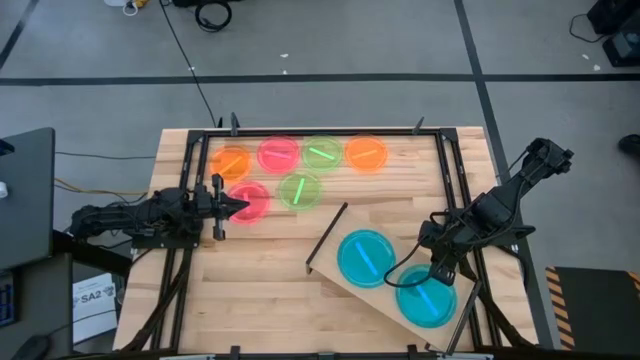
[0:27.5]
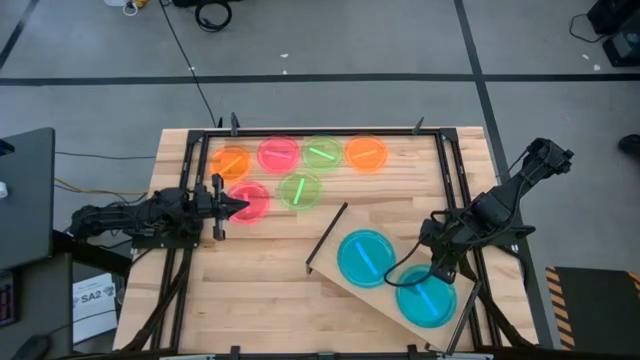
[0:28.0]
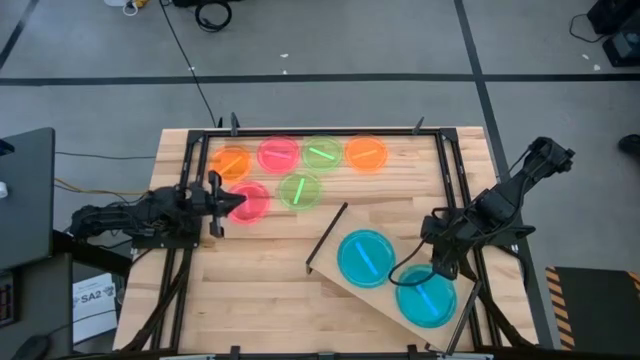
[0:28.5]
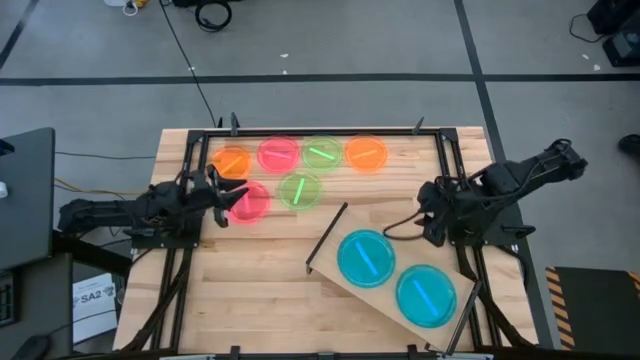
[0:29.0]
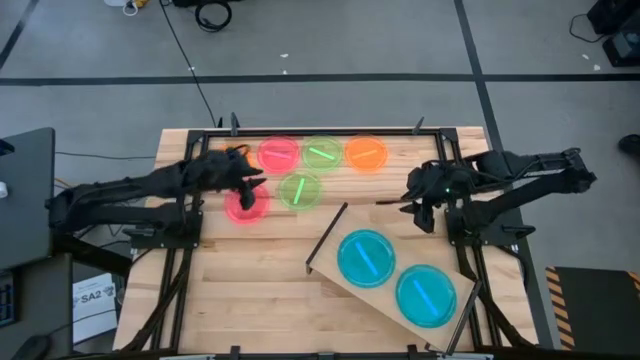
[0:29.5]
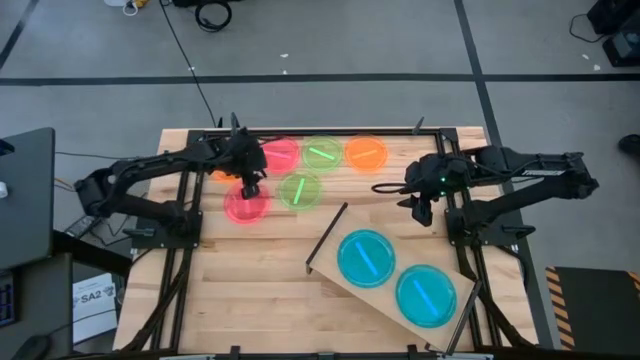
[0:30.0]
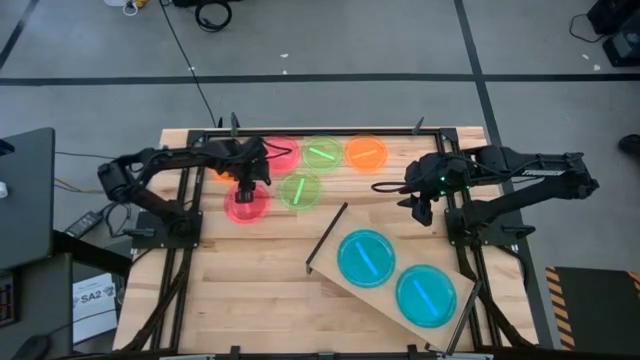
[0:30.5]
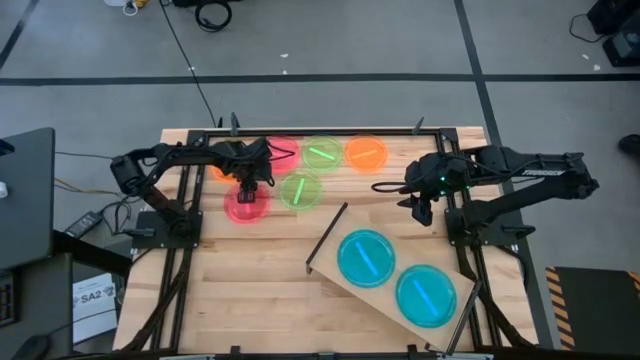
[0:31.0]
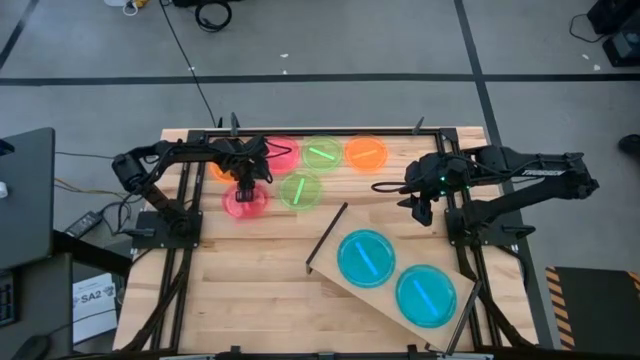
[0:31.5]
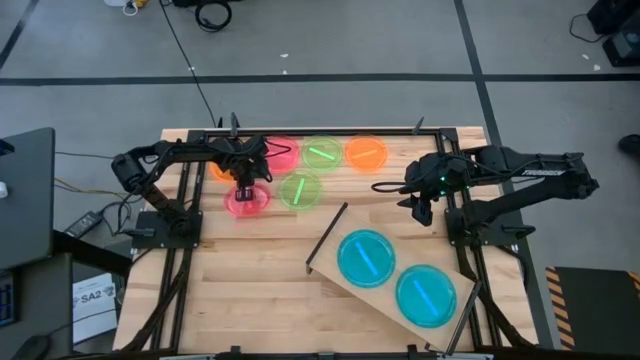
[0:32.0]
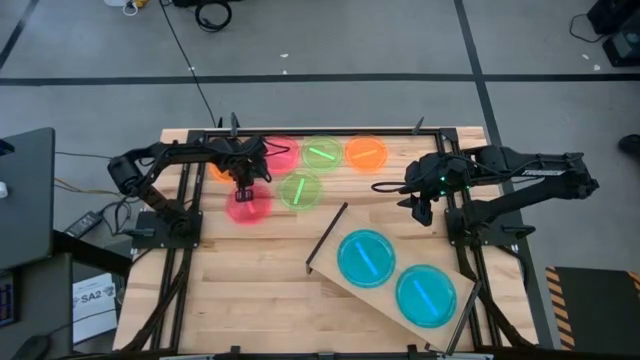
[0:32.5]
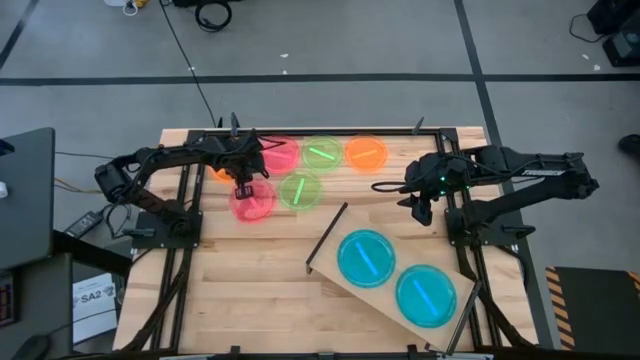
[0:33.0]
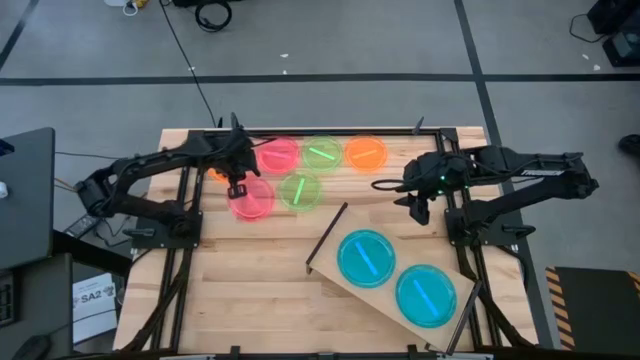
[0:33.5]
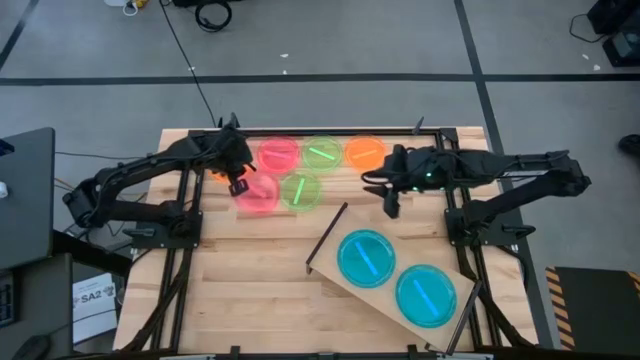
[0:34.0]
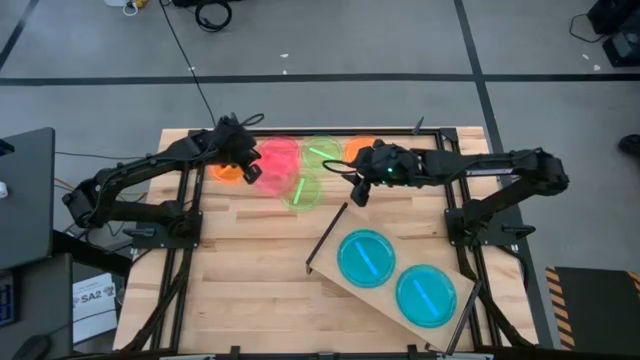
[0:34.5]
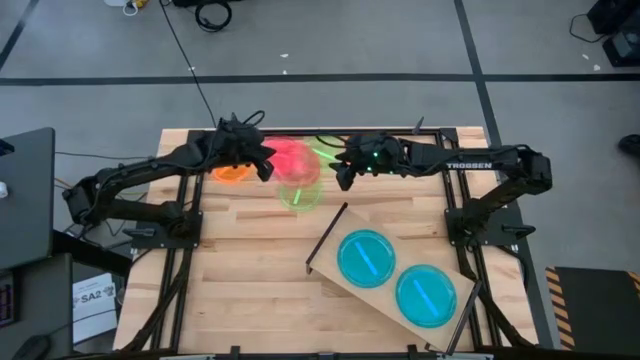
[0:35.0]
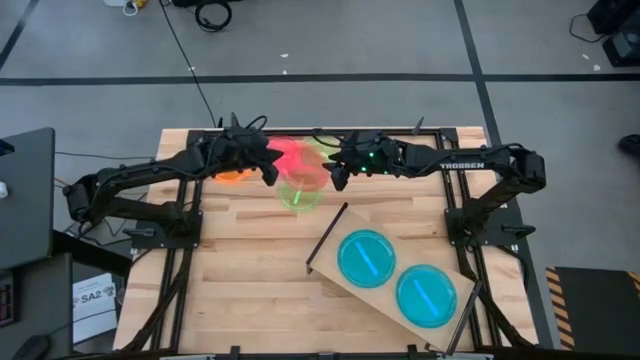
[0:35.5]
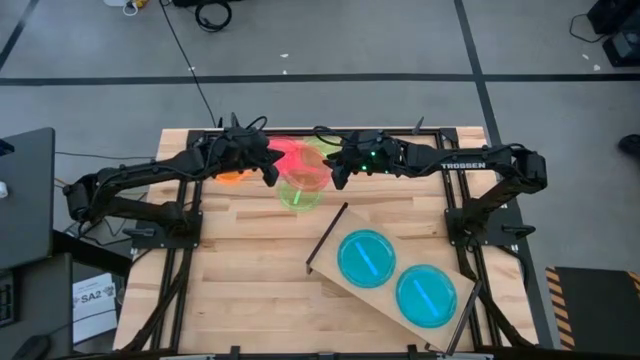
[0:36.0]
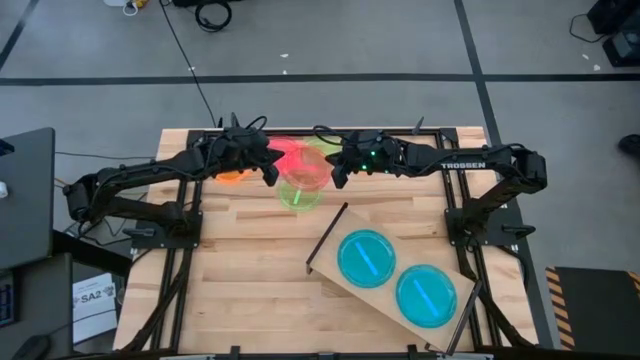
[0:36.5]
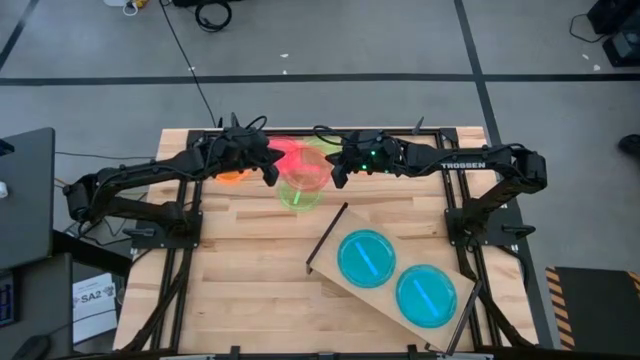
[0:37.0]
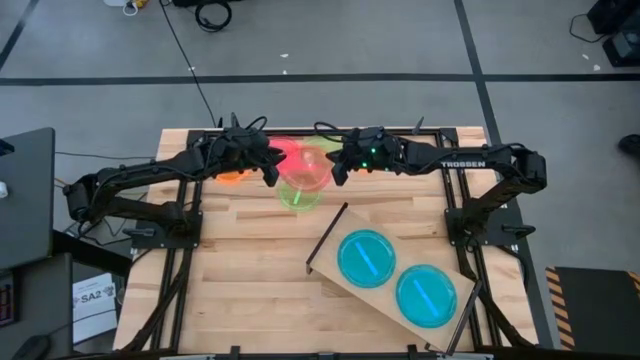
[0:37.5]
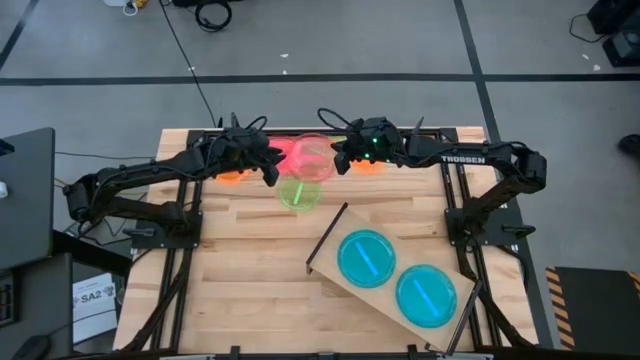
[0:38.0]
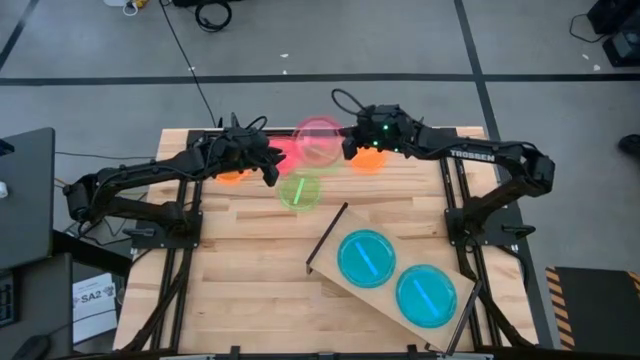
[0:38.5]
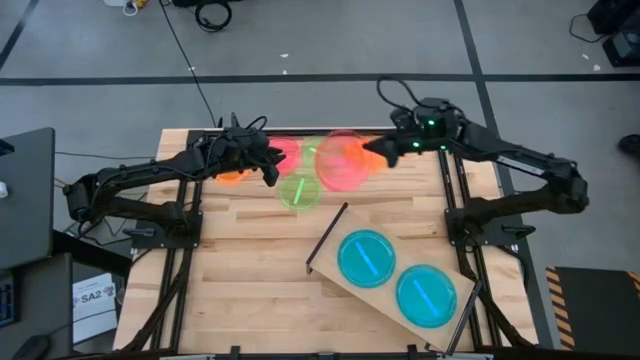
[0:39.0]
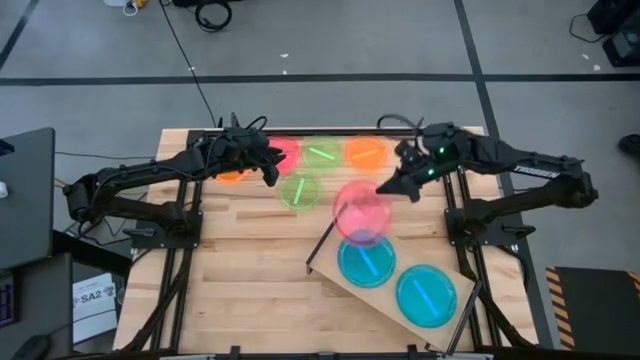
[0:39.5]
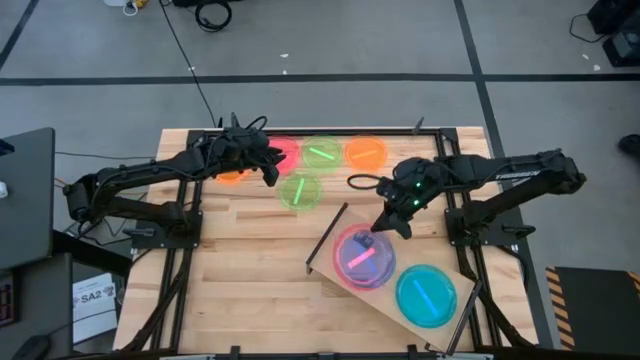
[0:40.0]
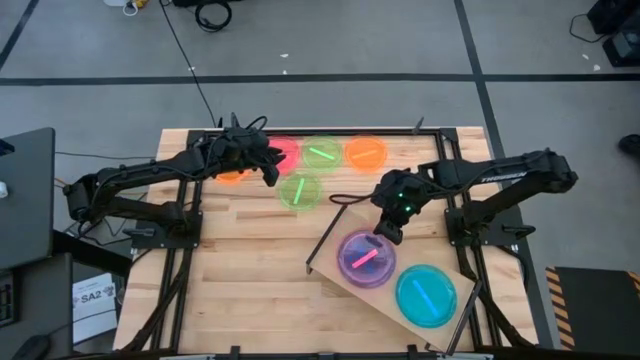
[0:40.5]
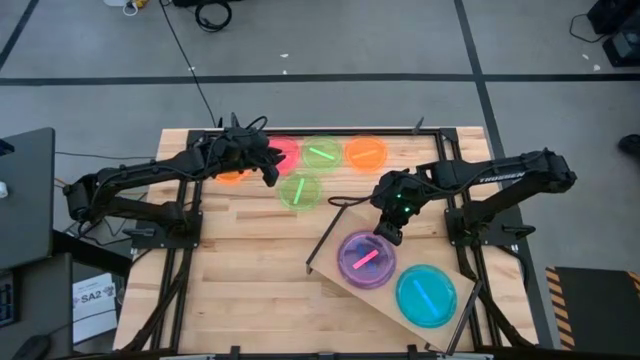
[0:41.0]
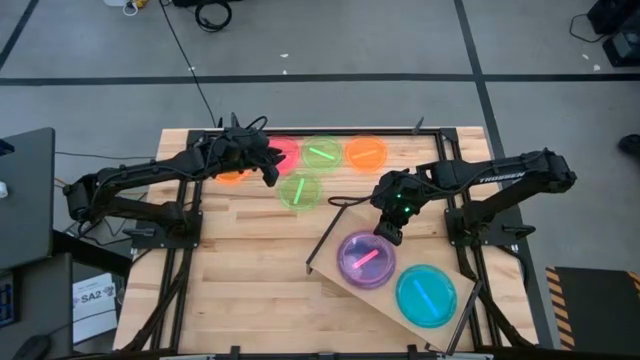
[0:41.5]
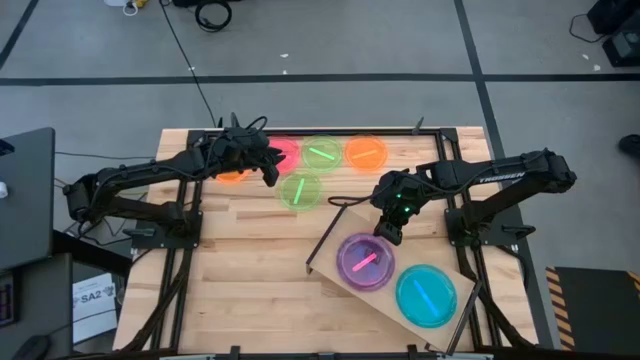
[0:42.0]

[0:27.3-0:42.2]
Task: Place and stack plates onto a shelf
Stack the bottom transparent pink plate on the left transparent blue plate on the shelf

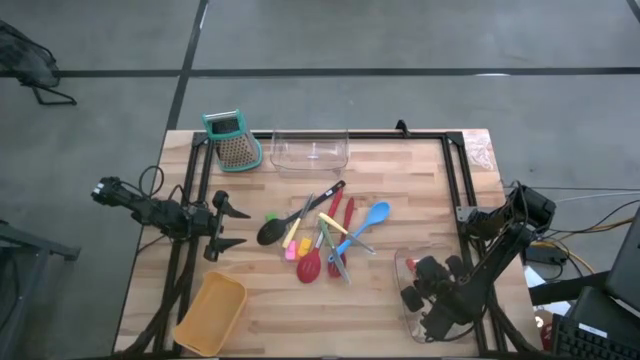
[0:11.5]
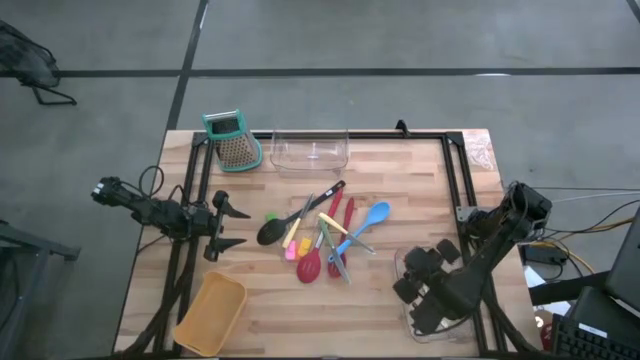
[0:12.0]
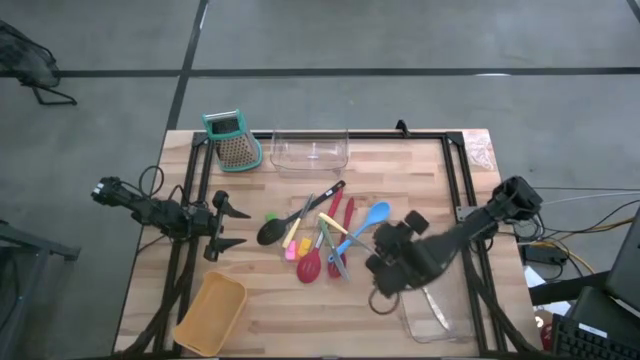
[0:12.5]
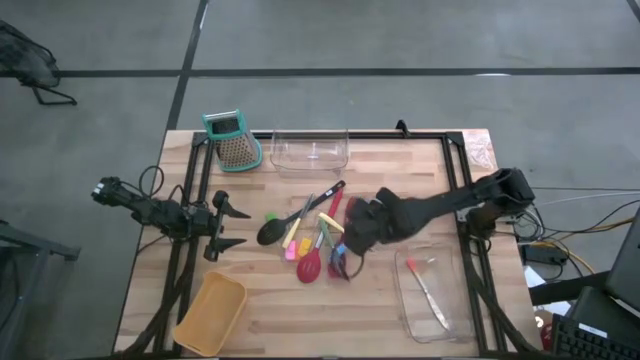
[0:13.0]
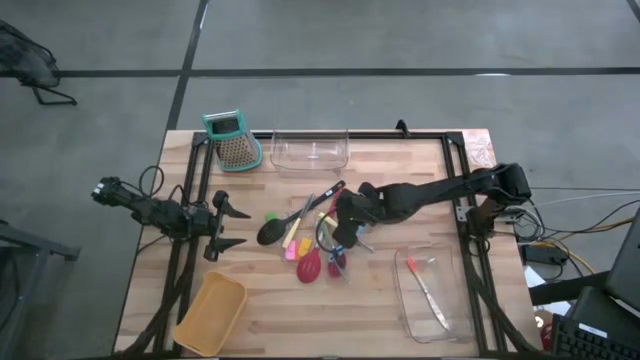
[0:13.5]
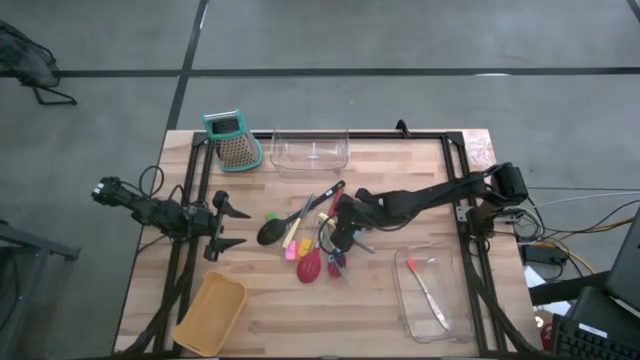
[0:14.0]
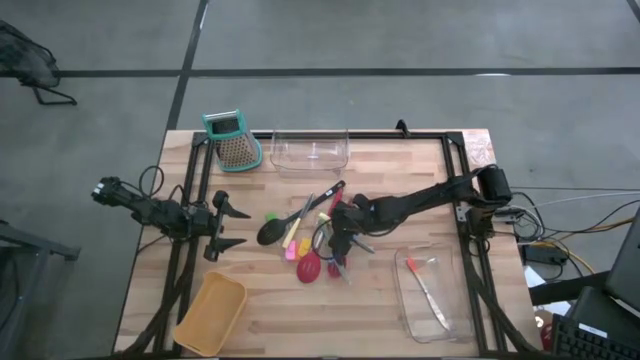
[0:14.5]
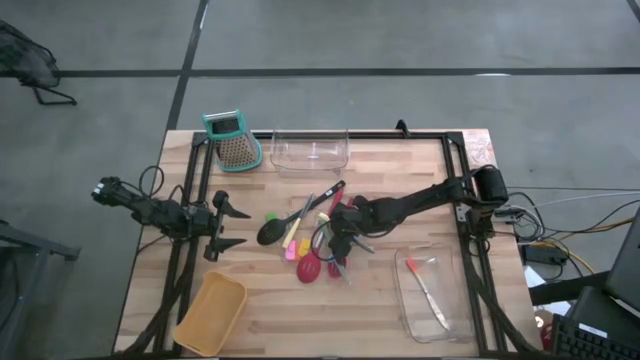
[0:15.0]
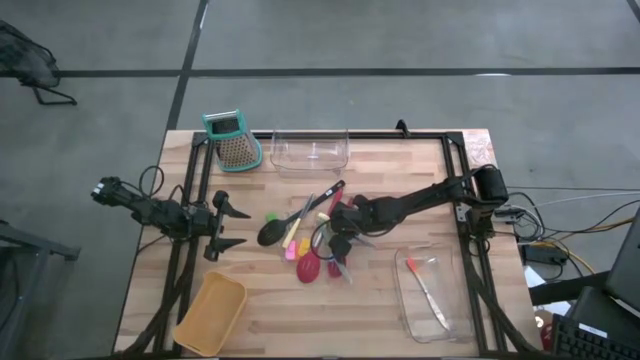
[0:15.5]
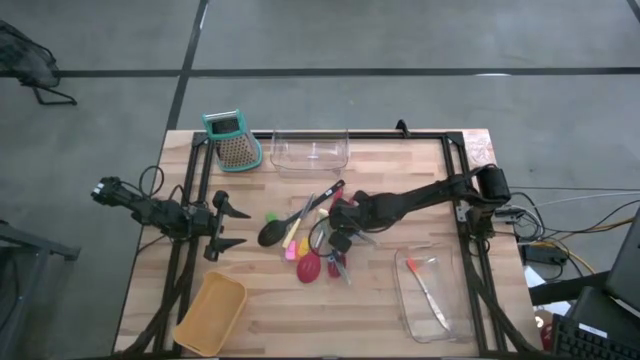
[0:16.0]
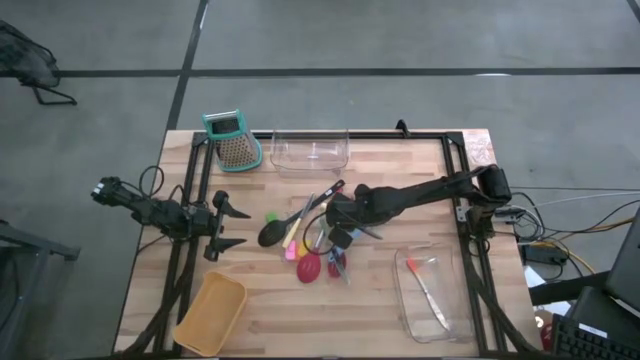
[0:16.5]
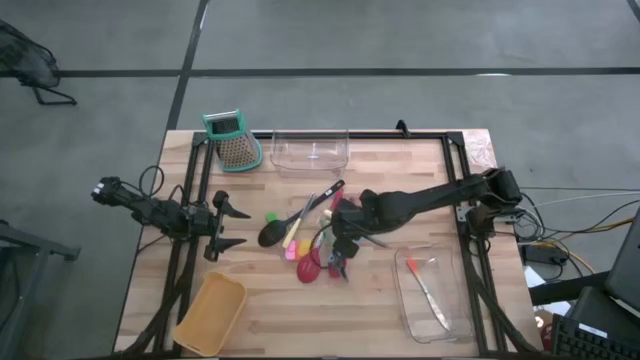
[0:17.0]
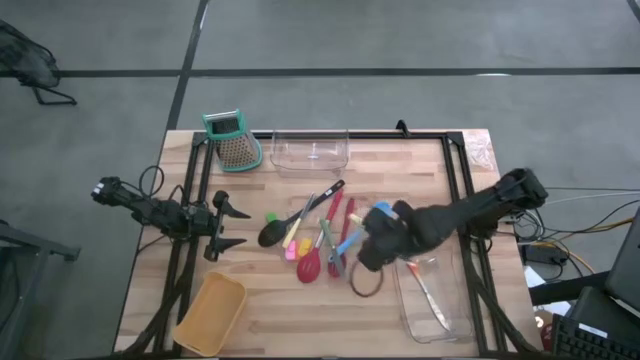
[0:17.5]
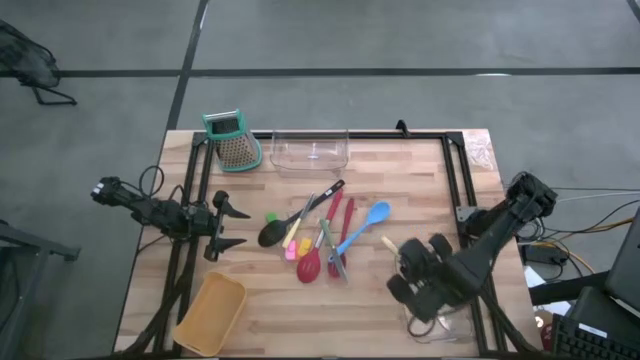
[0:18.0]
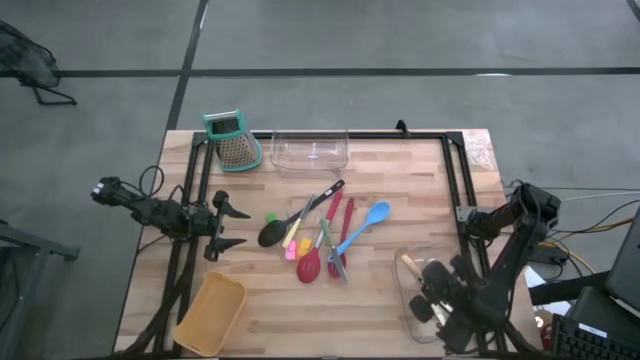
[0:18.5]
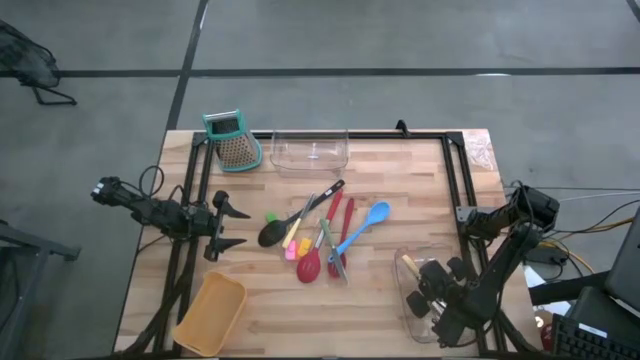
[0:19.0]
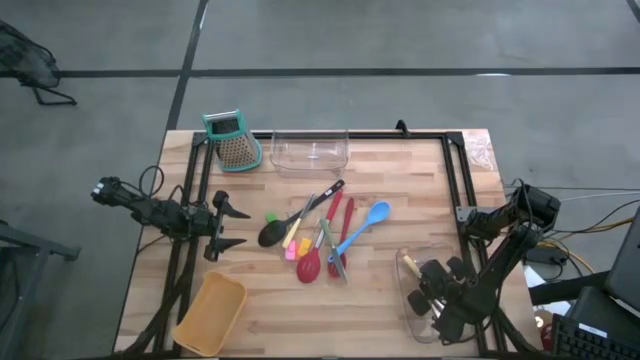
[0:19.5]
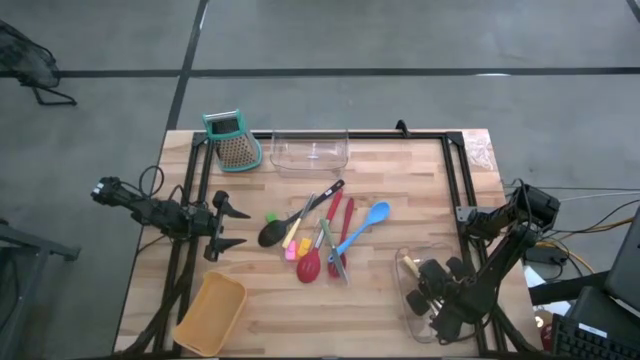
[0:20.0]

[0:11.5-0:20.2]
Task: Pick & Place Kitchen Items
Put the right yellow knife into the bottom transparent bin
